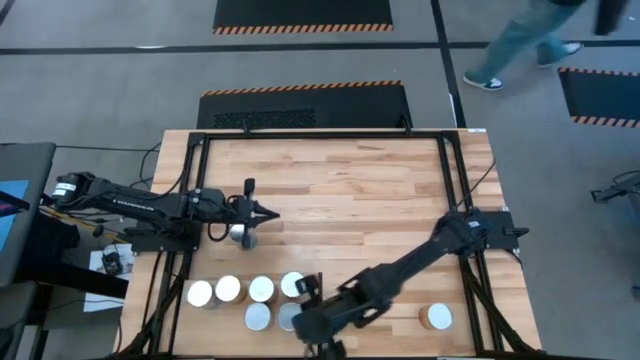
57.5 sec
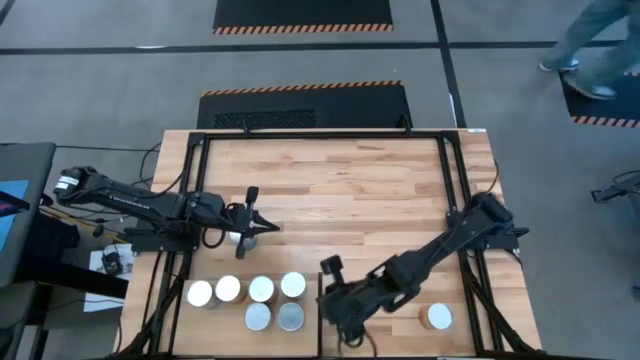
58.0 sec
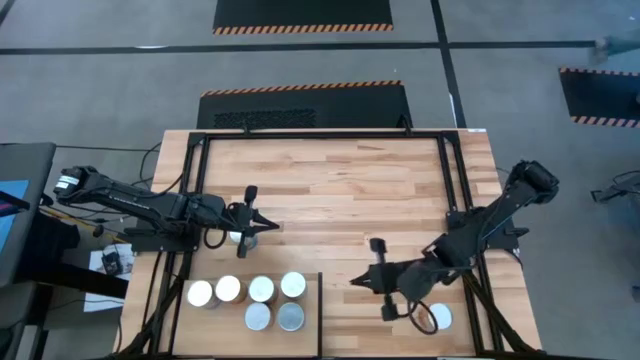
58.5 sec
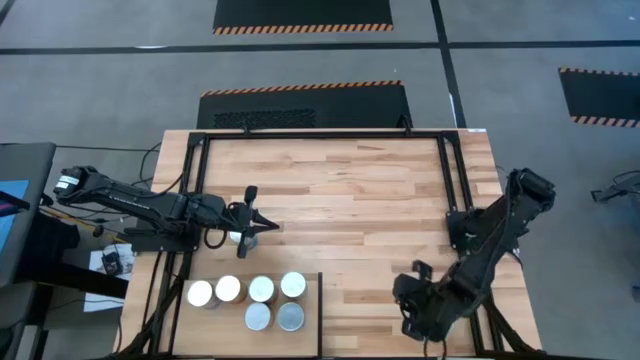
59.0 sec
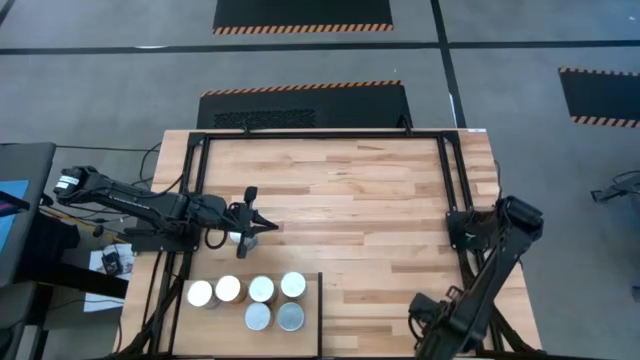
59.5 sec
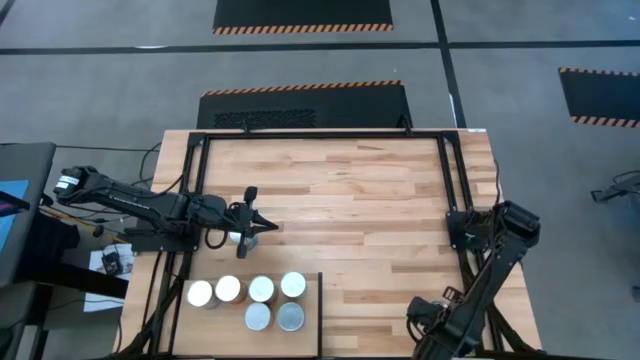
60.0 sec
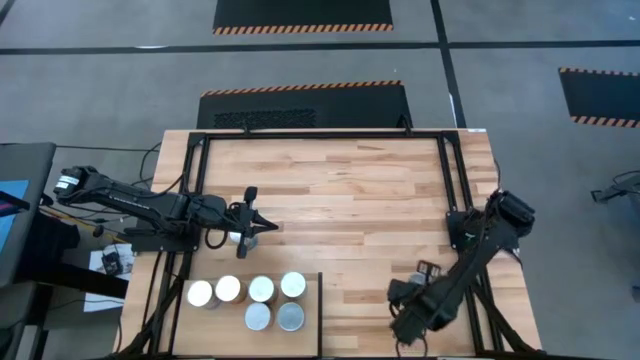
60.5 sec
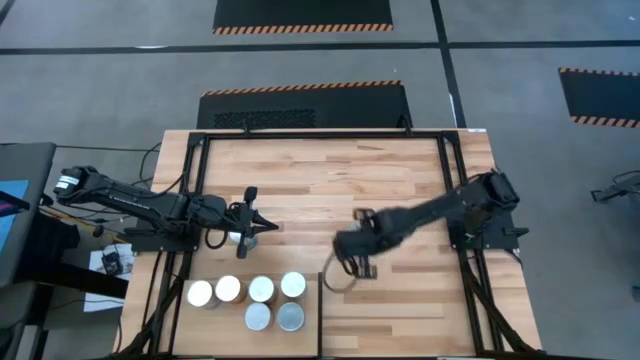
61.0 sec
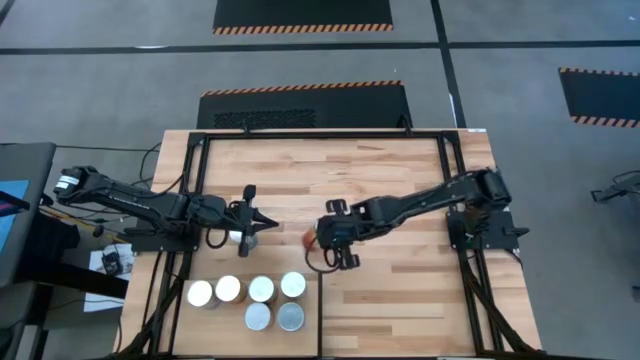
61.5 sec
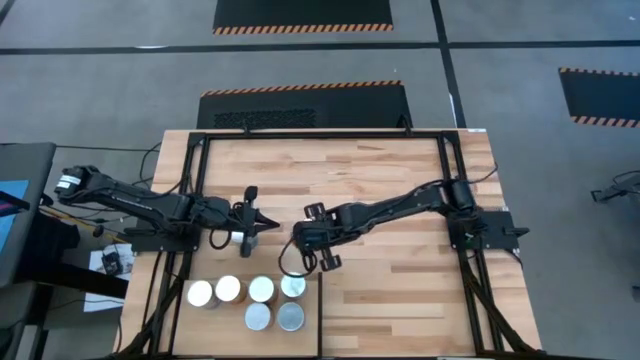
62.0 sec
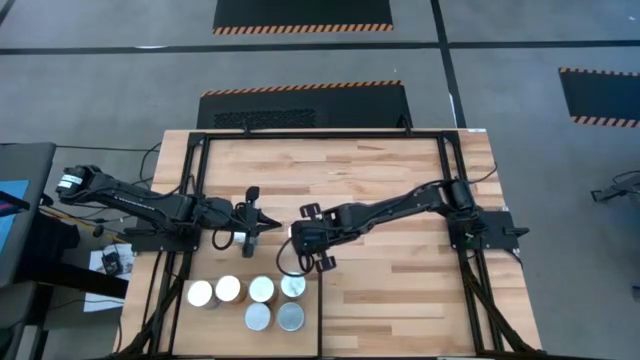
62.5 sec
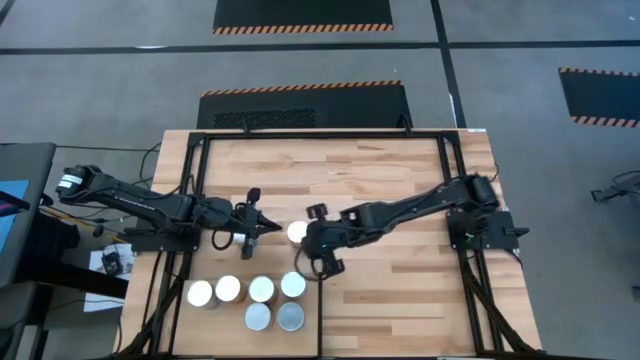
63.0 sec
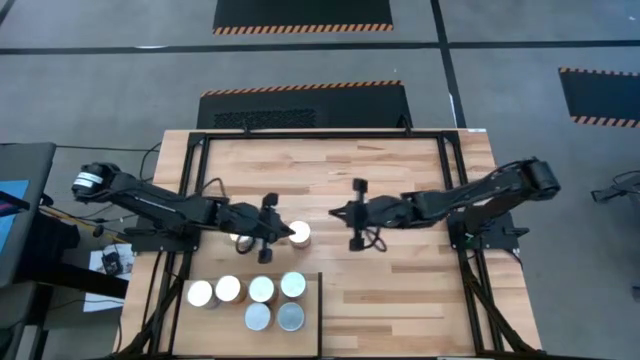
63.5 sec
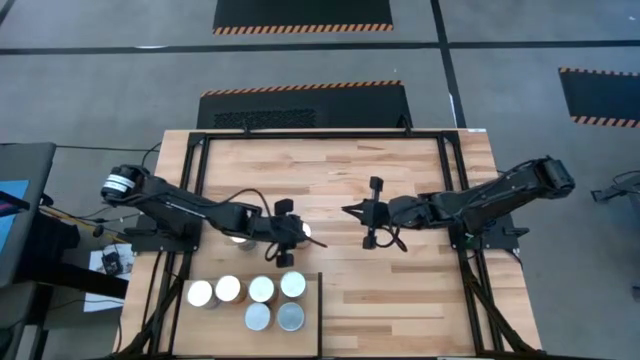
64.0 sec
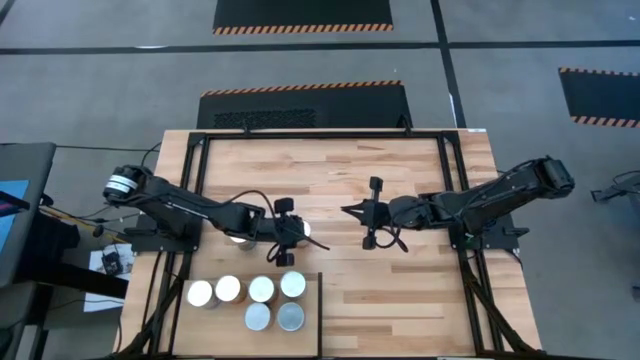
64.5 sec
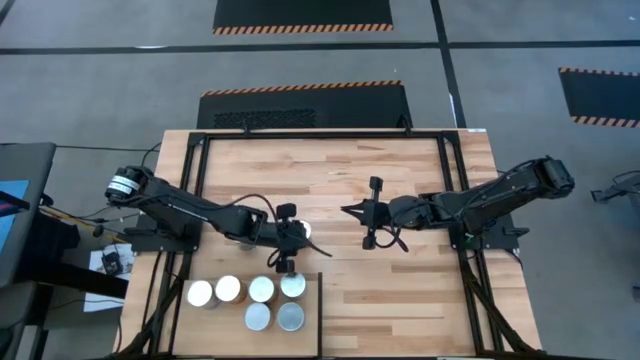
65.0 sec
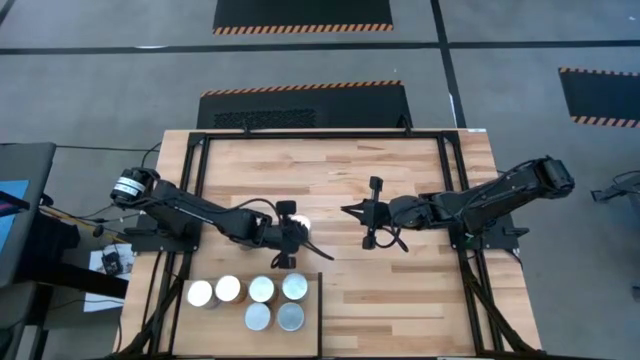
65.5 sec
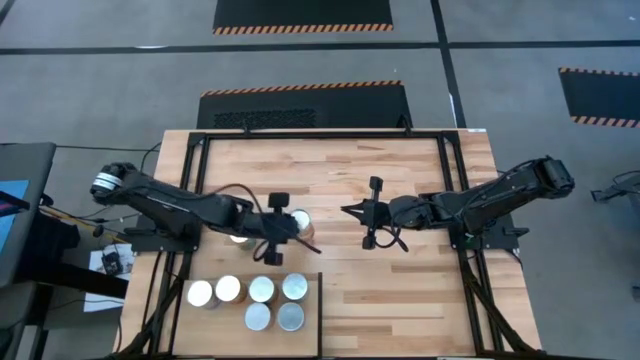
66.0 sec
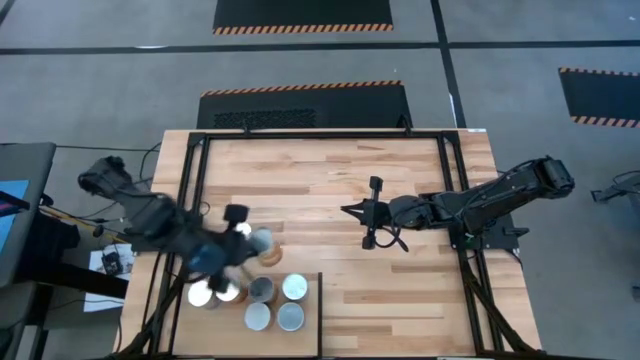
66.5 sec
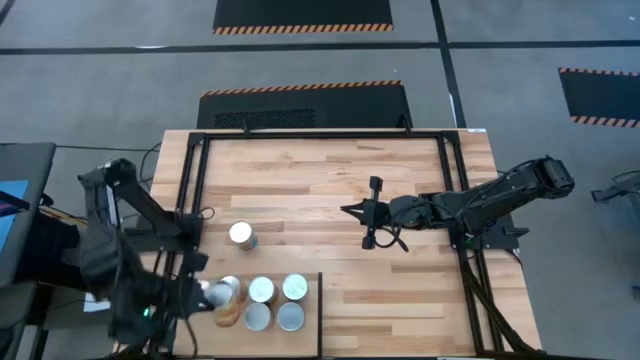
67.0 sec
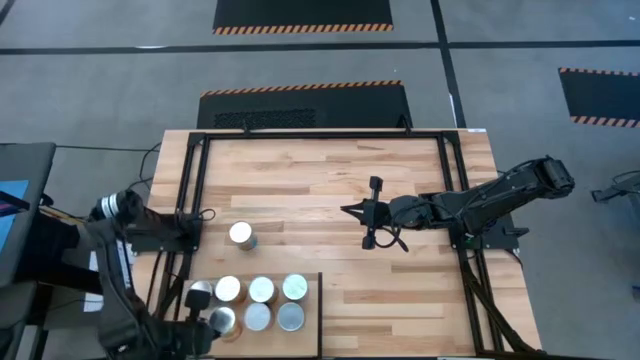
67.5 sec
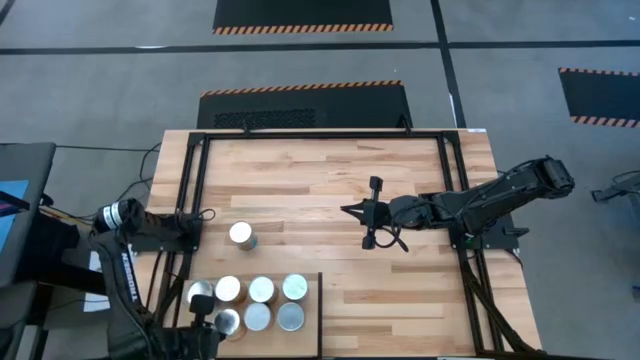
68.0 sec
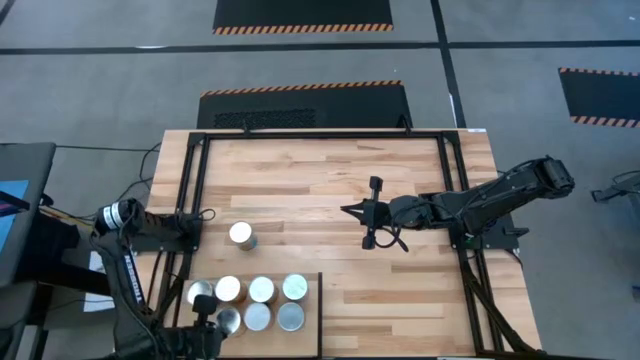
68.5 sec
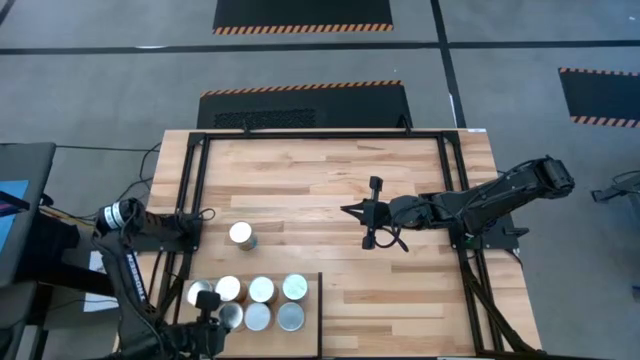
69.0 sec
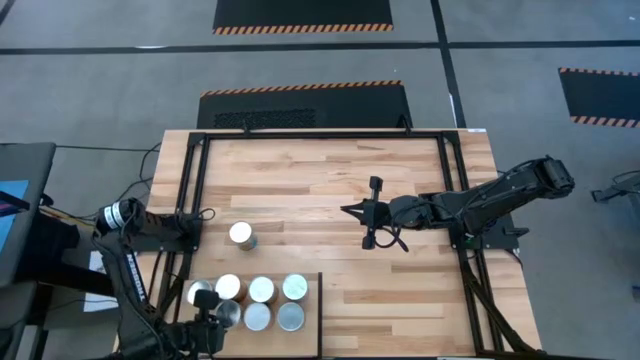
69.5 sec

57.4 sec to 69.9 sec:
Task: Pick and place cans onto a shelf
Put the canned corn on the shelf

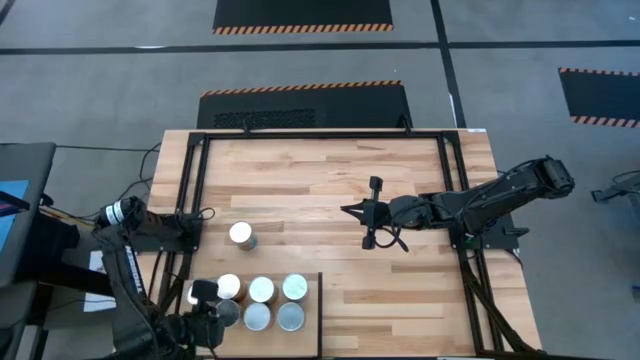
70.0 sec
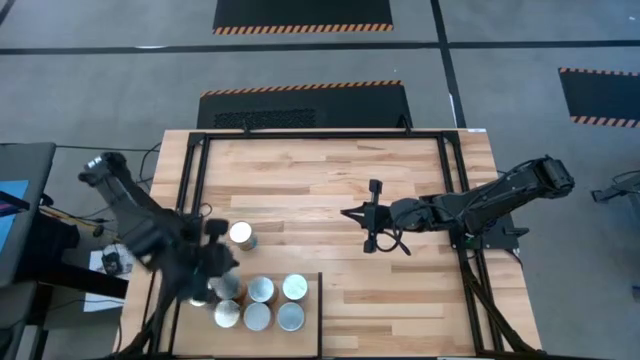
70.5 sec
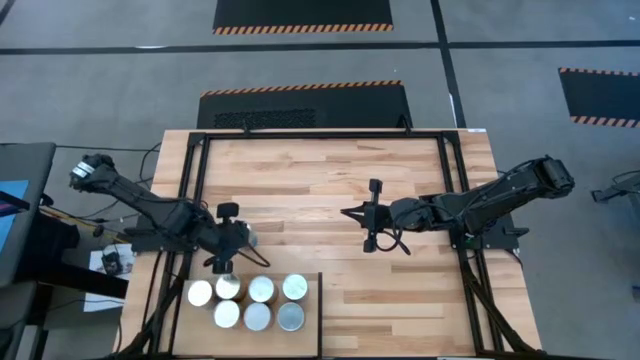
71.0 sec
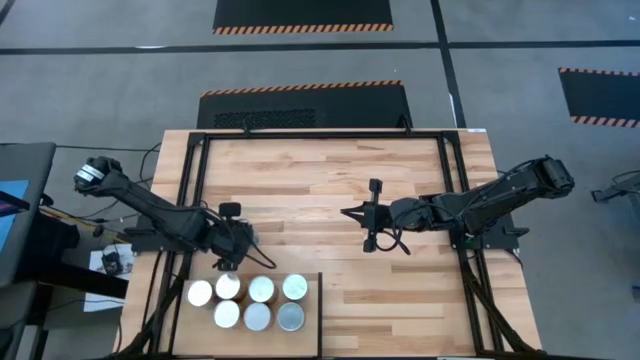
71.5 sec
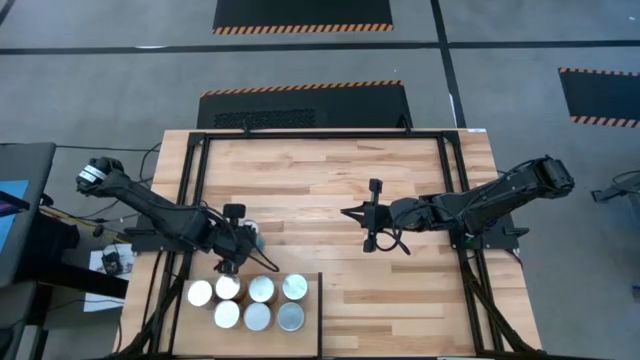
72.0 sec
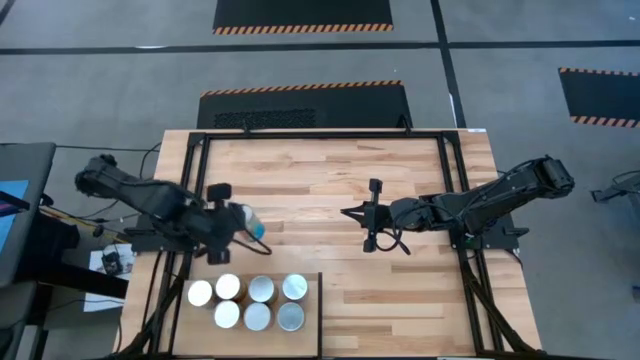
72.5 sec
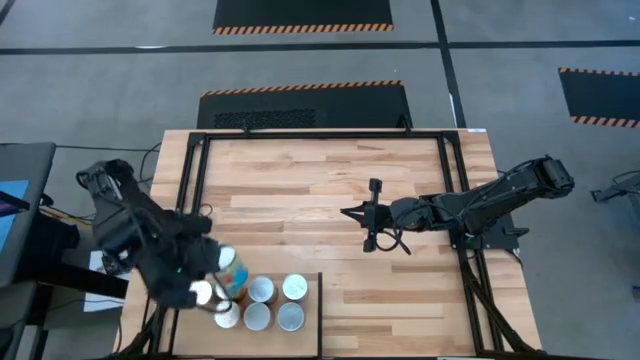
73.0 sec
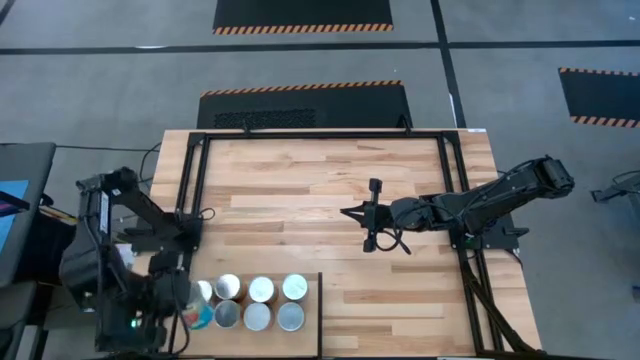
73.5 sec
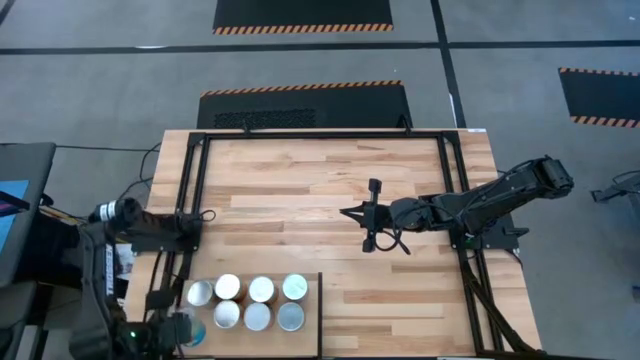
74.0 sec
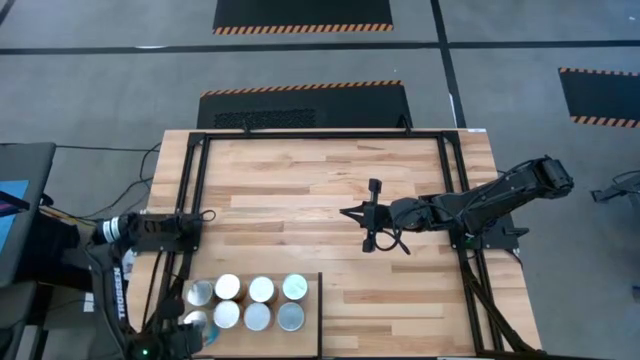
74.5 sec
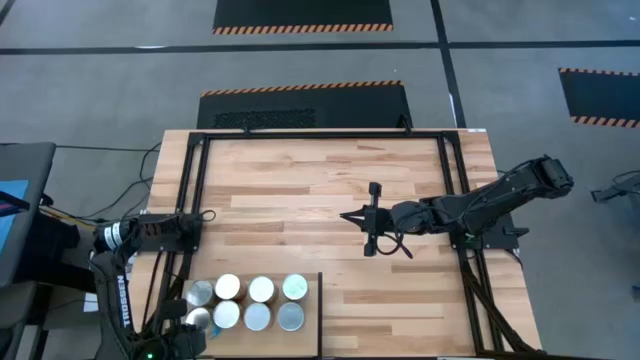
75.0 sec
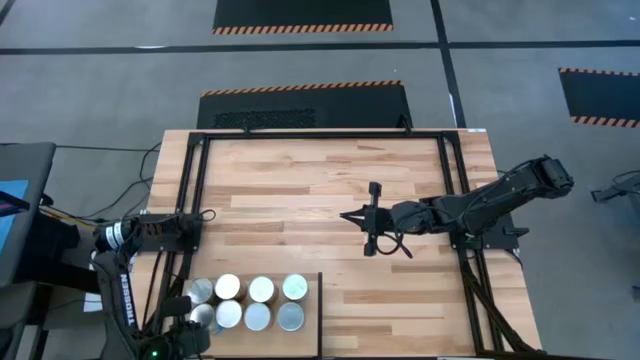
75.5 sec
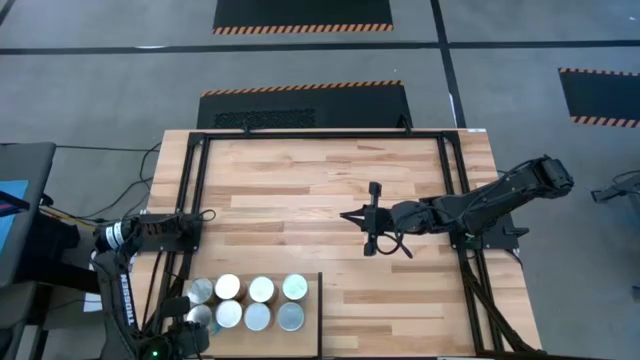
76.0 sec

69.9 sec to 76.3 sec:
Put the canned peaches on the shelf

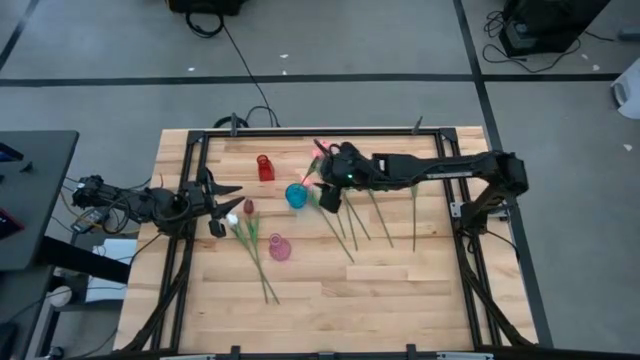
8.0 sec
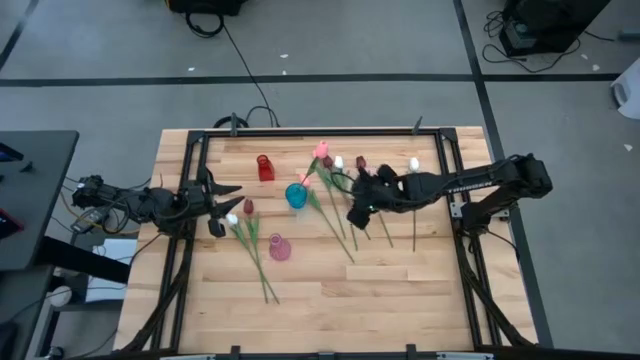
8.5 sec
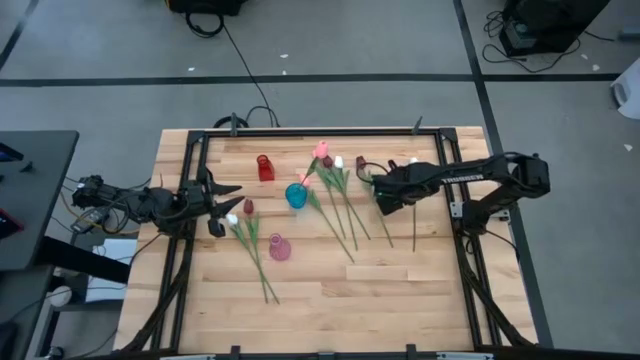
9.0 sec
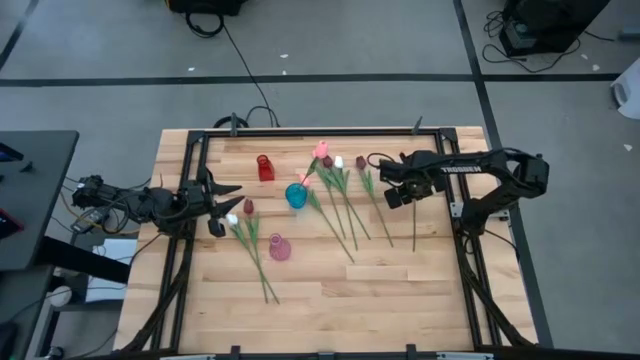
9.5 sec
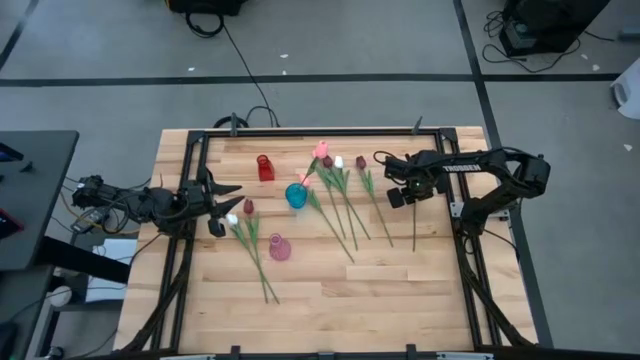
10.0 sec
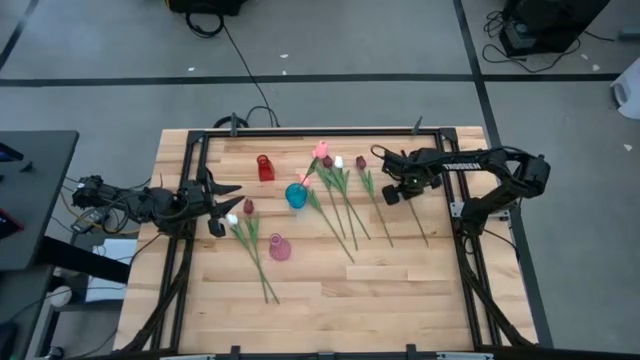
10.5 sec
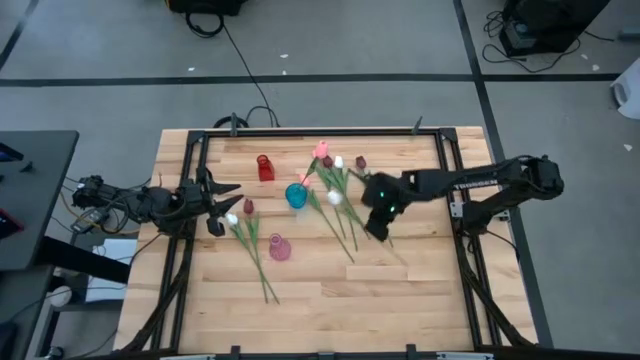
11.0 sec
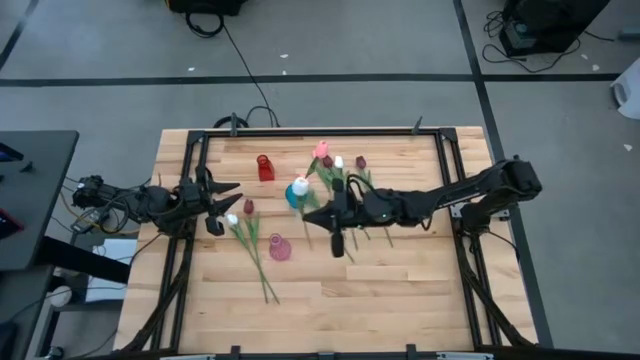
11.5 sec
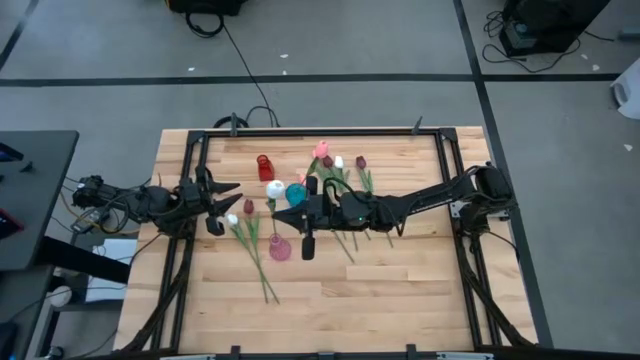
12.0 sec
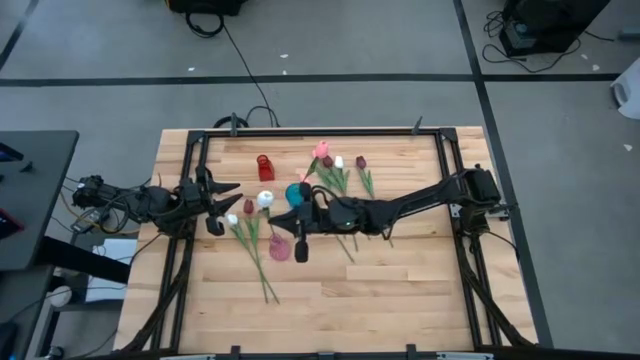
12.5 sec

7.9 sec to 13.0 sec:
Task: Sort flowers into vase by color
Put the top right white tulip into the pink vase
